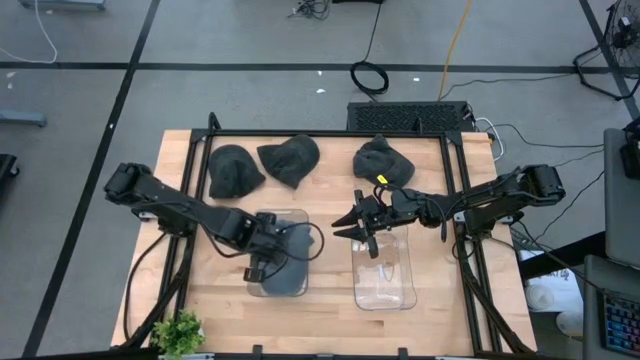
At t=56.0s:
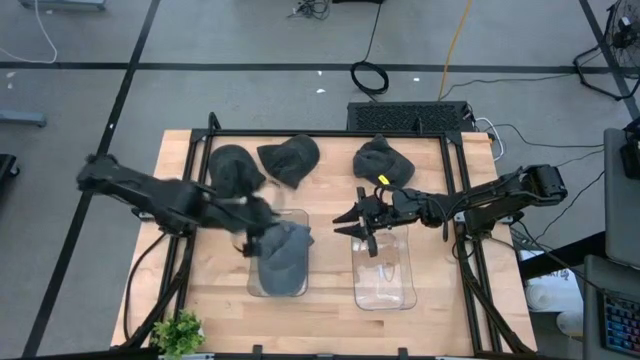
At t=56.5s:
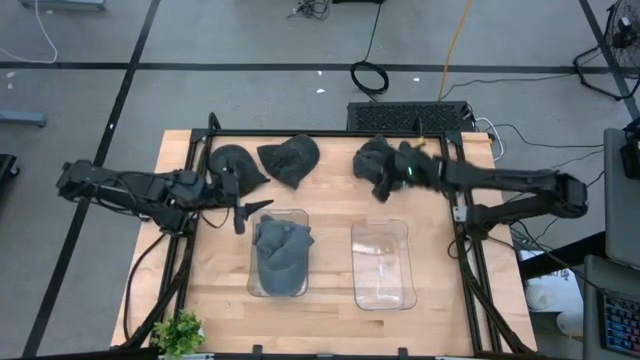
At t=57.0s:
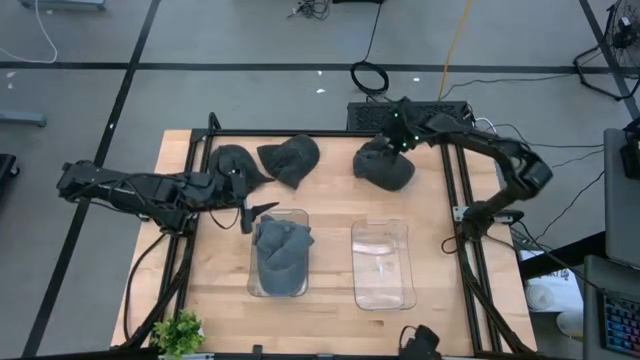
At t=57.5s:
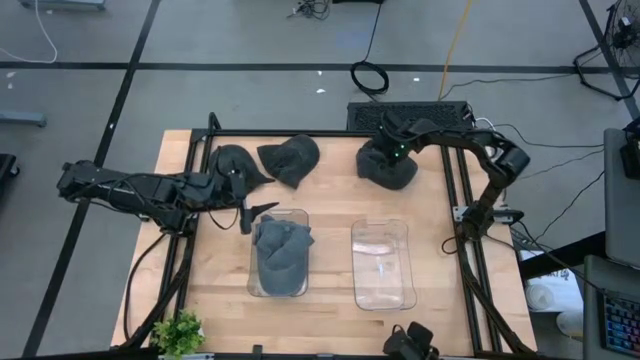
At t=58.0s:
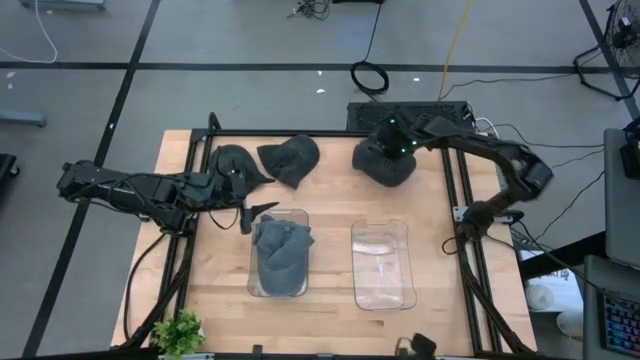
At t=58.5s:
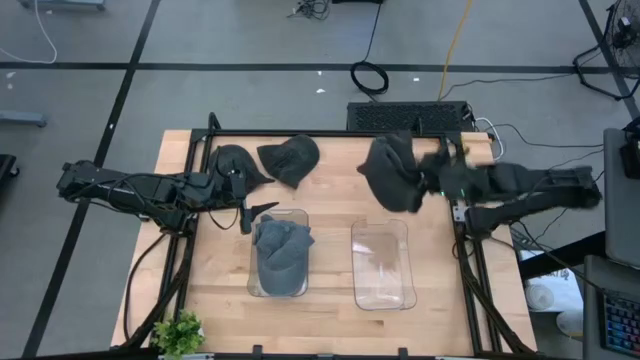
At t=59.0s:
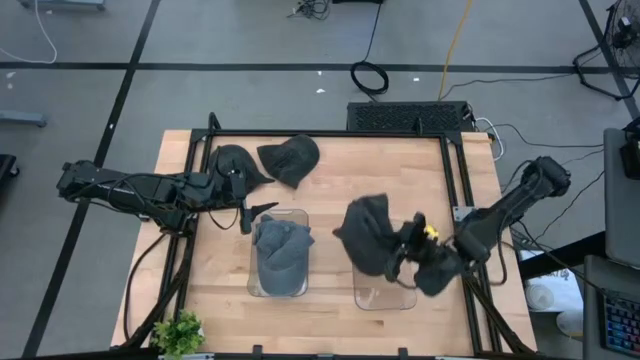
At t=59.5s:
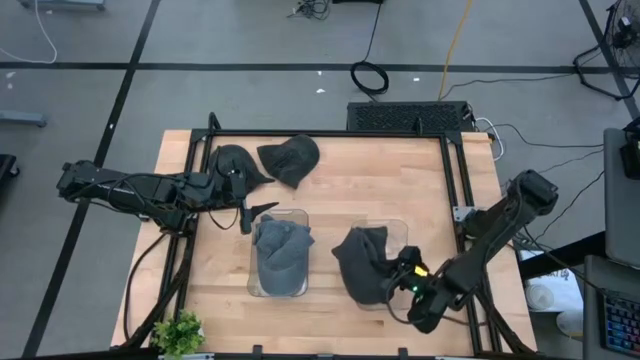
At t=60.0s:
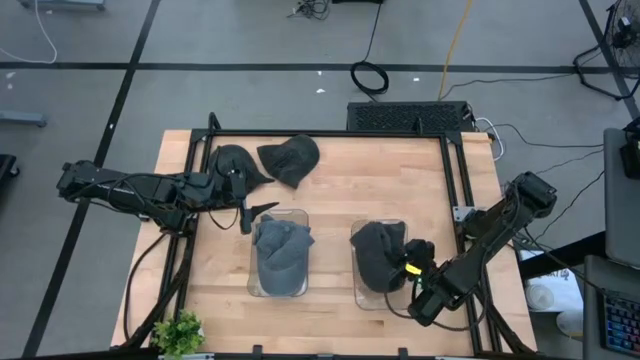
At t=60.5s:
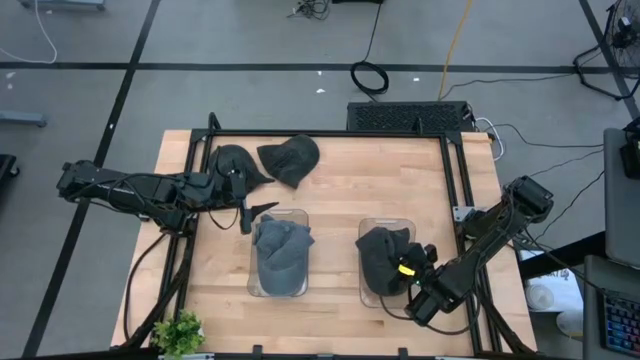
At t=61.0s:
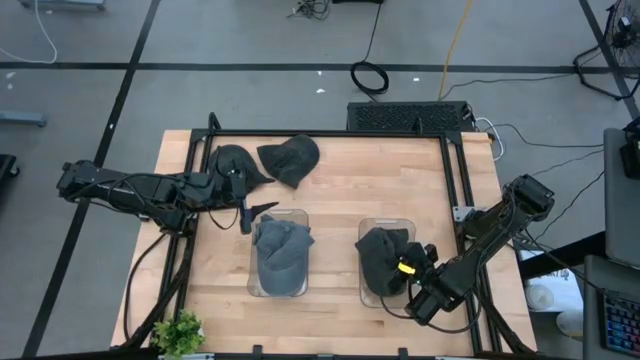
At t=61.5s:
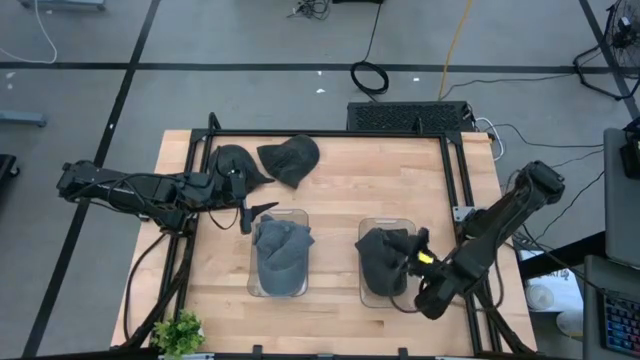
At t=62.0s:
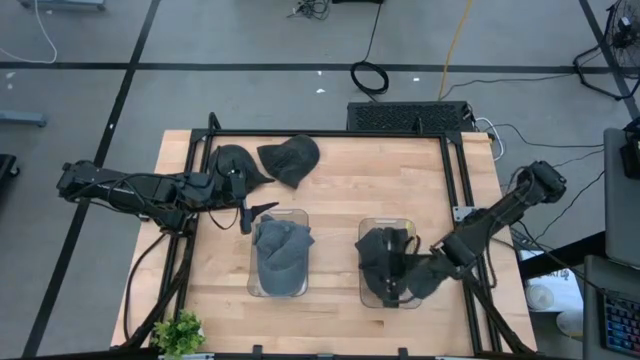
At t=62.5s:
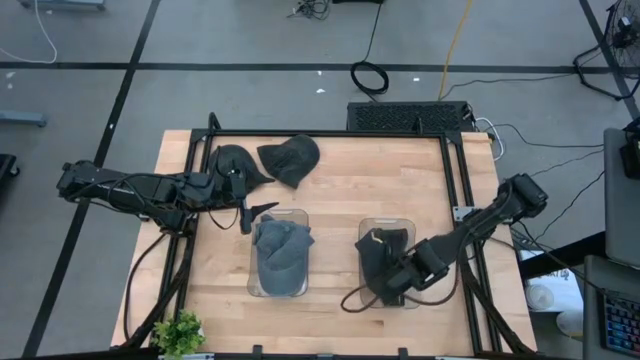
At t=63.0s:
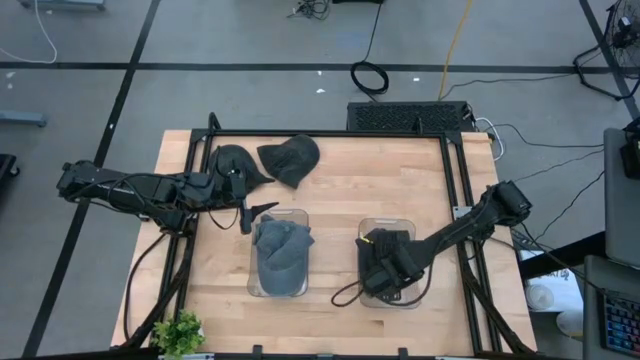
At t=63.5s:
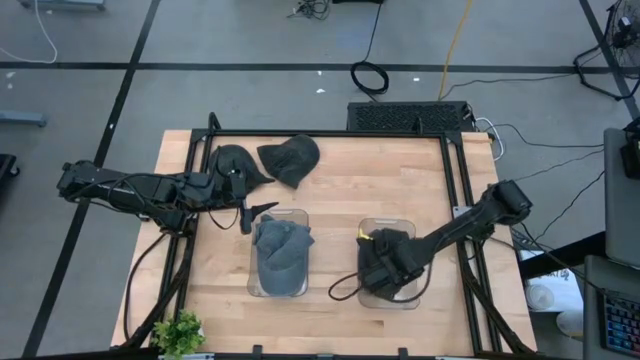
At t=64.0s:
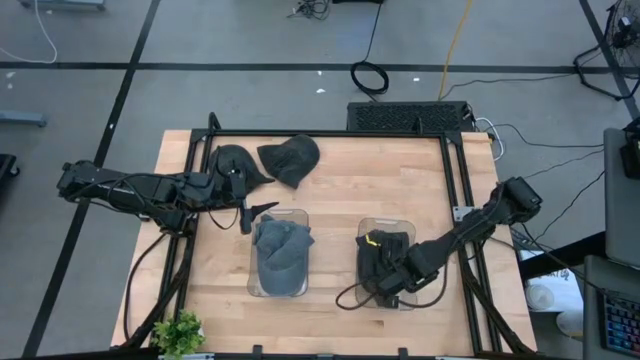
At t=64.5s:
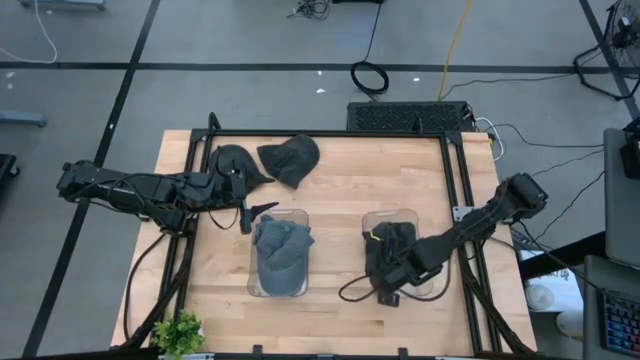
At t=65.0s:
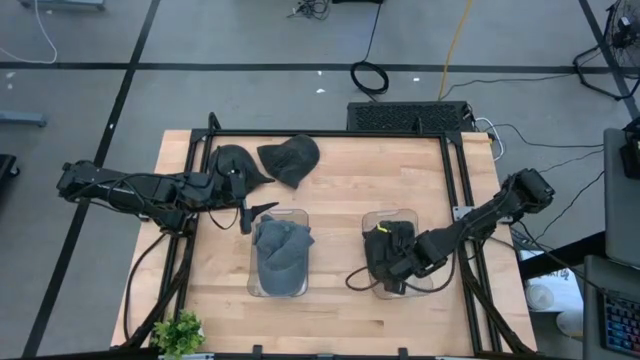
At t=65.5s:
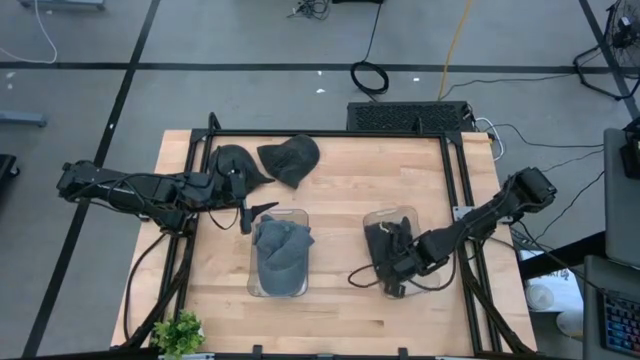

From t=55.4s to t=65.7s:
Task: Pick & Place hat
Put the right black cap into the right transparent bin

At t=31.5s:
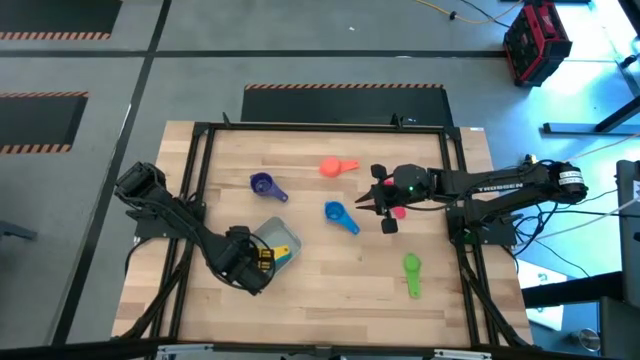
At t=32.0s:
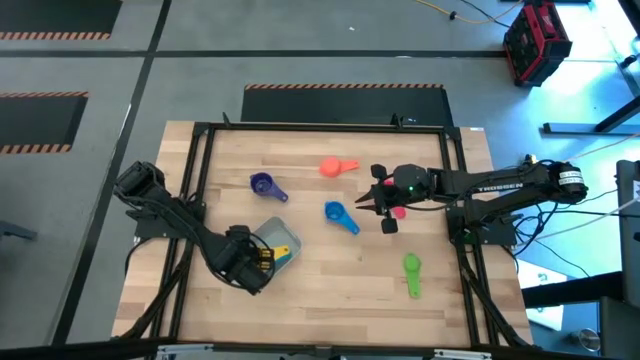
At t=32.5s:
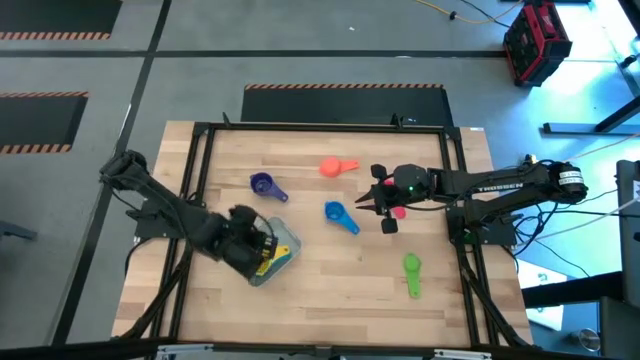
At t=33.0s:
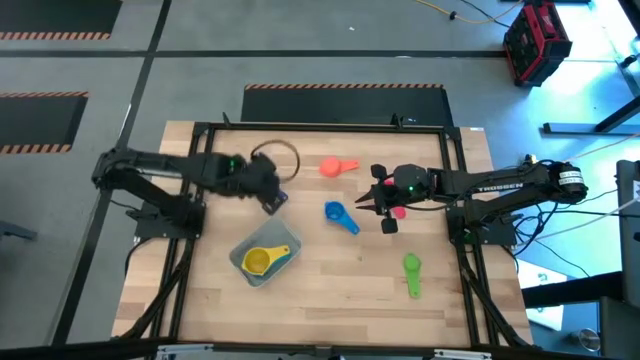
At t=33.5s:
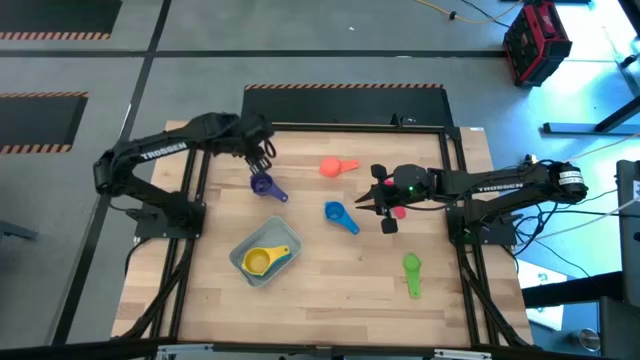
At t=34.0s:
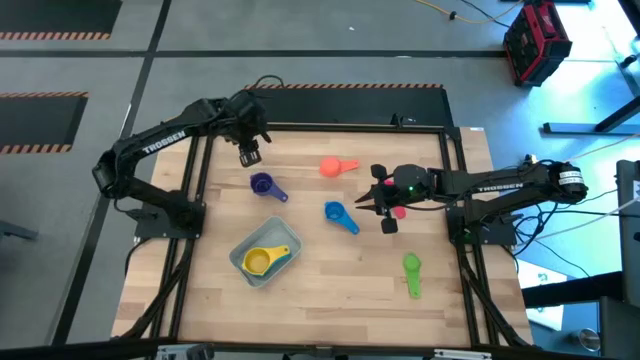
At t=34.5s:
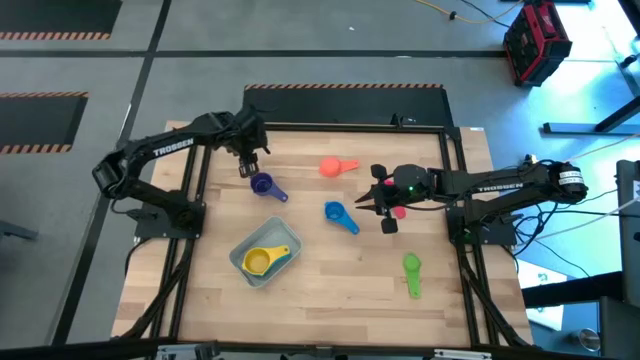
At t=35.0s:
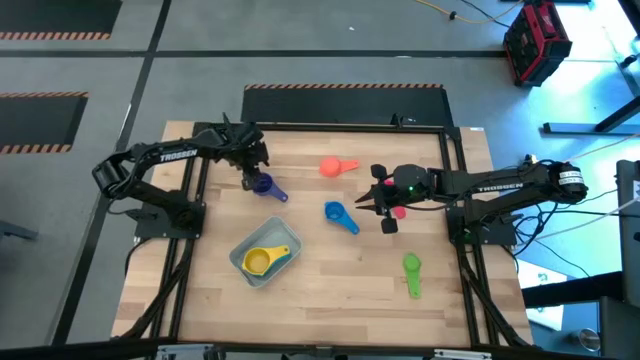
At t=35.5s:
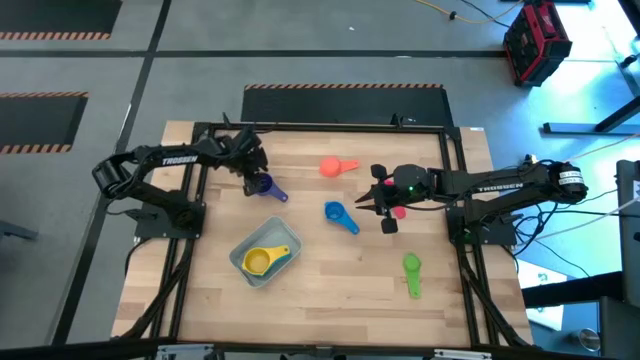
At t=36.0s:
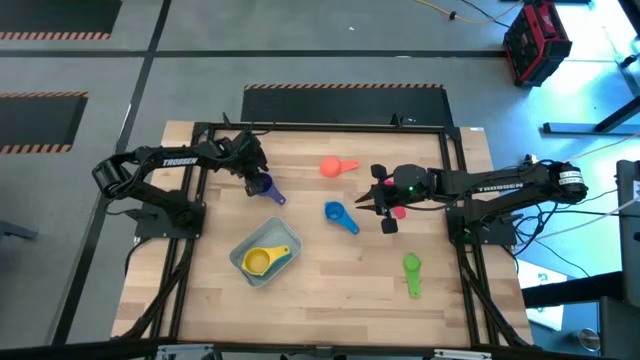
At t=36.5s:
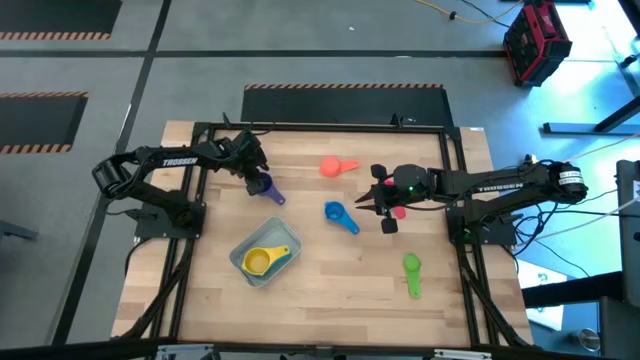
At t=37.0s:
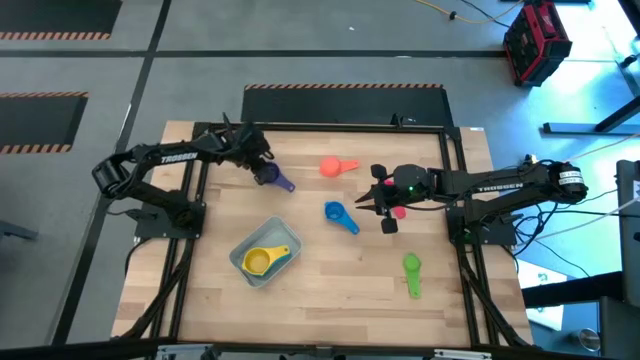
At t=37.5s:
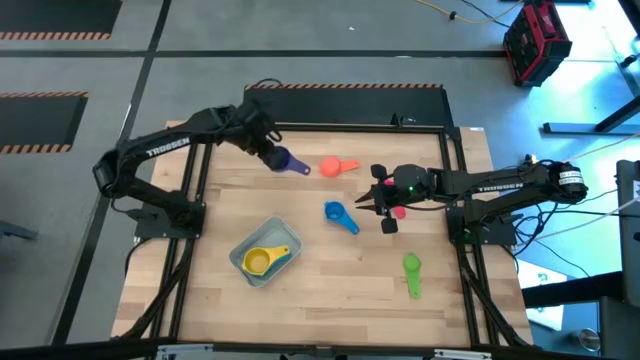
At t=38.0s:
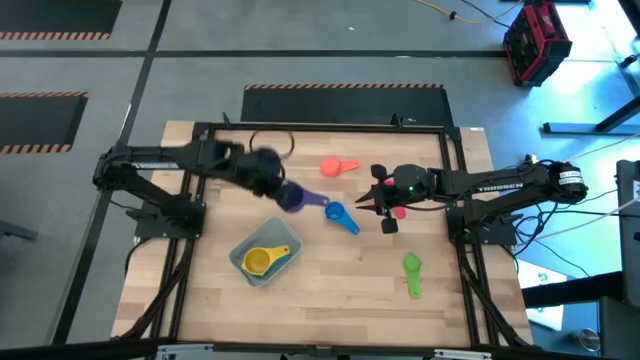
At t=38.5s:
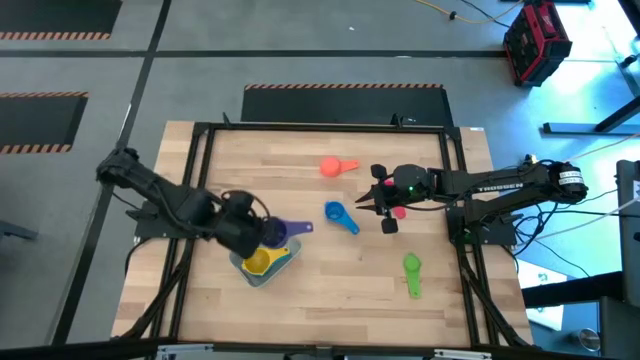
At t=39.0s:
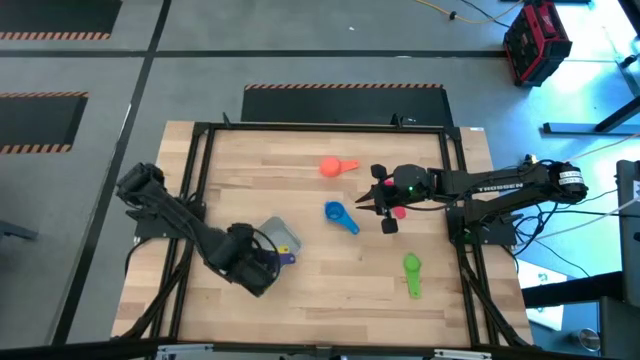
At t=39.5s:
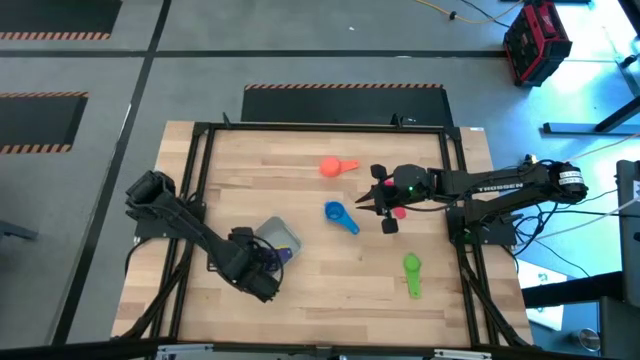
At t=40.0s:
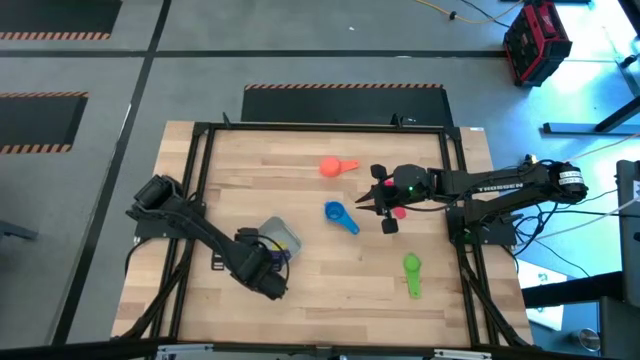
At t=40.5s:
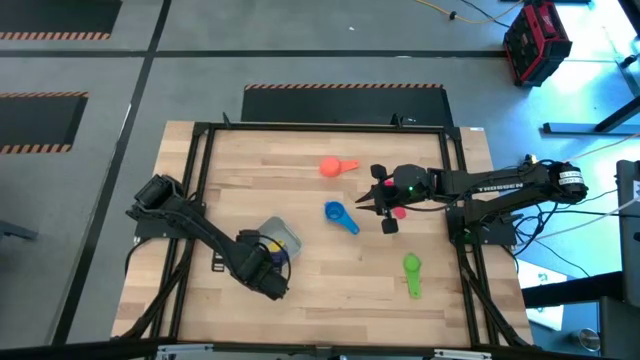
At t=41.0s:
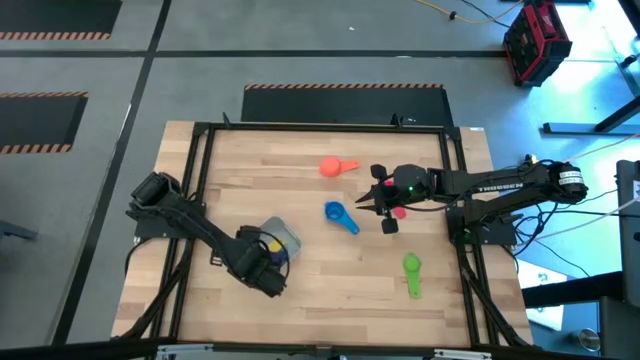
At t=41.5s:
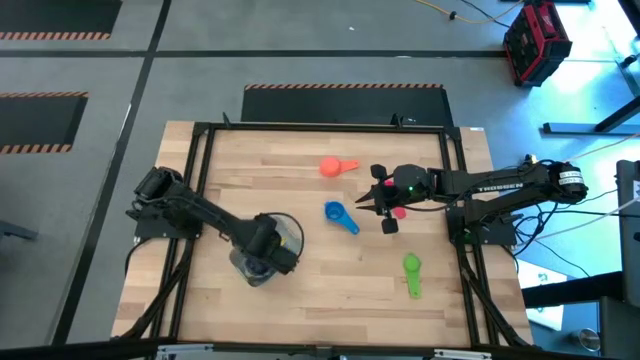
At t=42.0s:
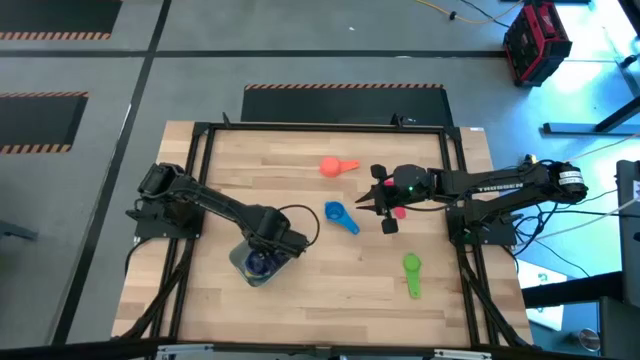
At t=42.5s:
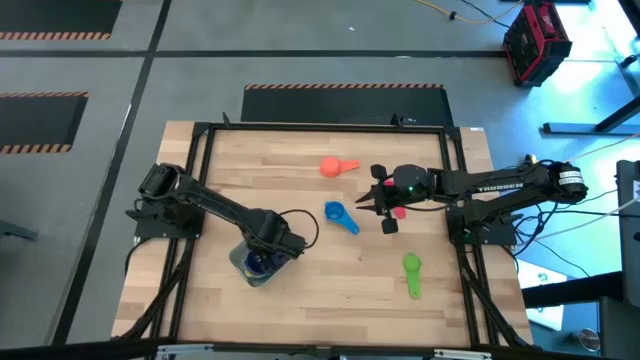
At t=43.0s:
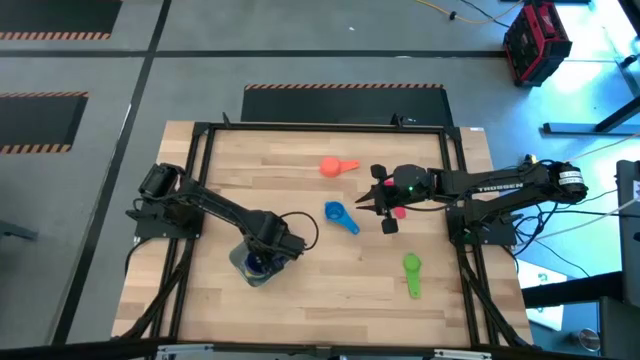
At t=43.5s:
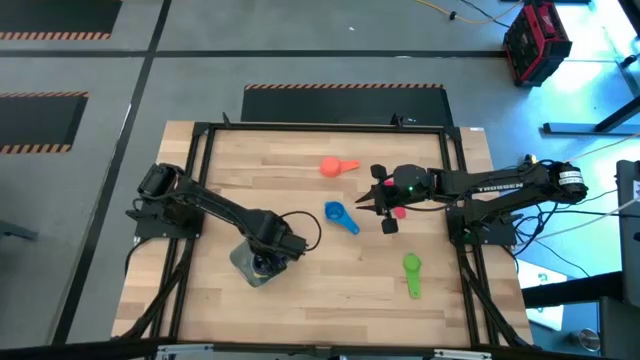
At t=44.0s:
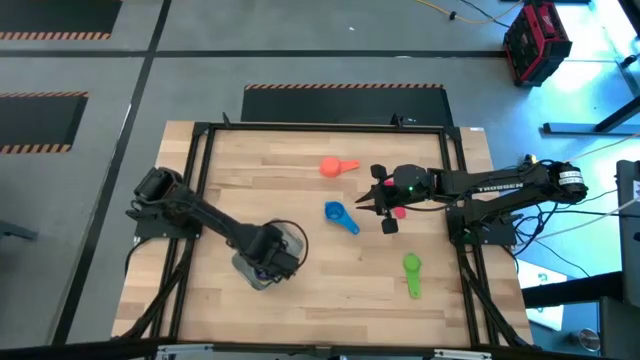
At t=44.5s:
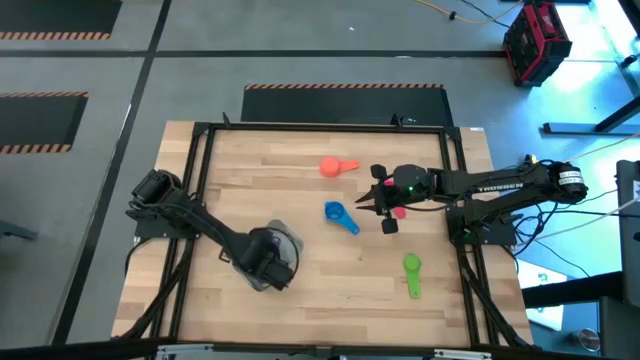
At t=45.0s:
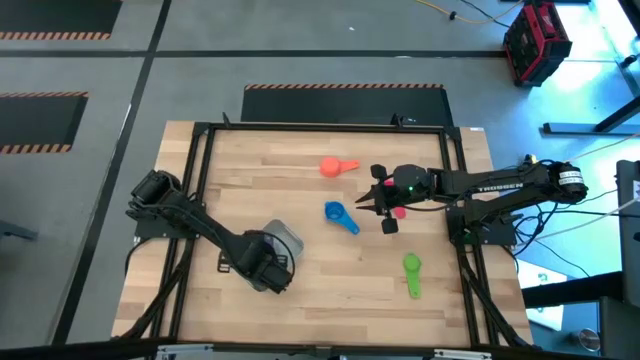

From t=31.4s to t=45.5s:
Task: Nest measuring cups in basket
Stack the violet measuring cup on the yellow measuring cup in the gray bin
